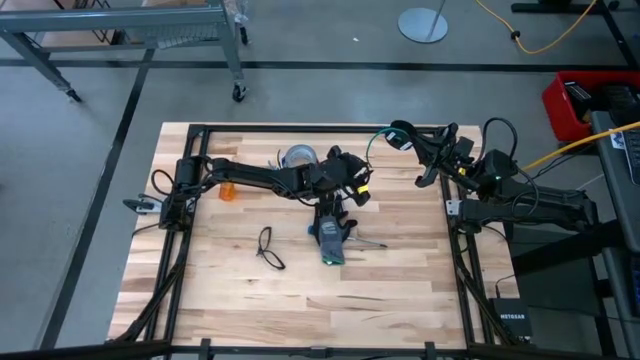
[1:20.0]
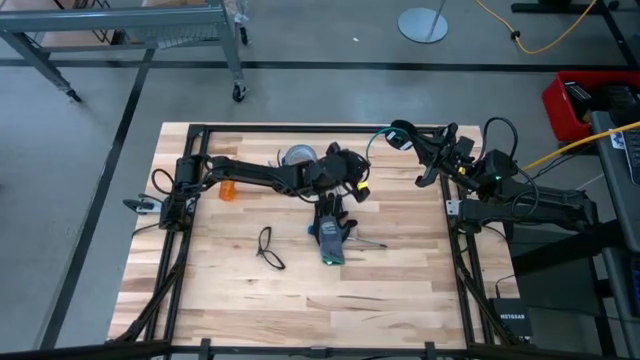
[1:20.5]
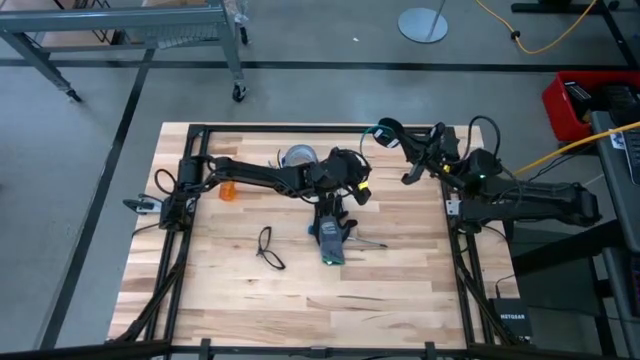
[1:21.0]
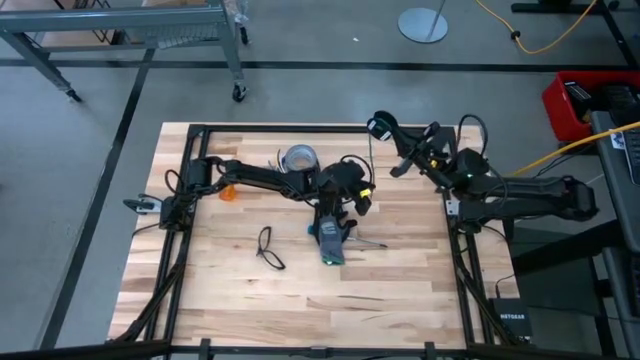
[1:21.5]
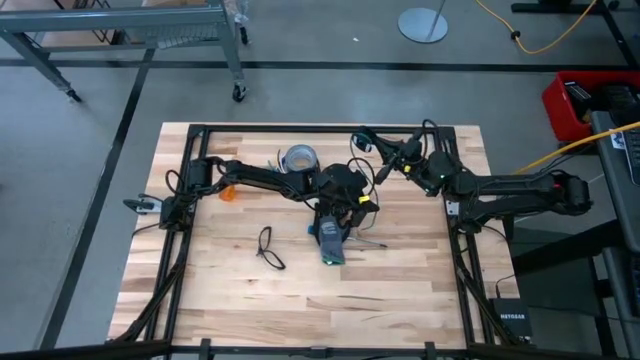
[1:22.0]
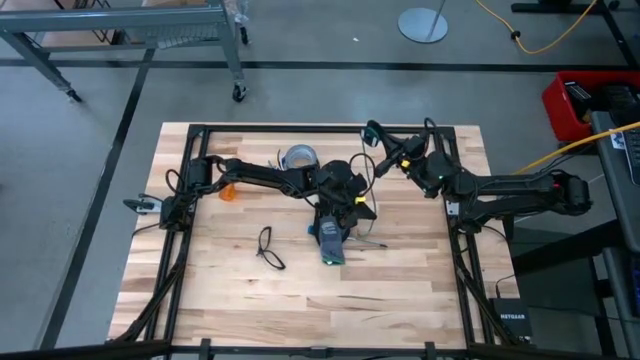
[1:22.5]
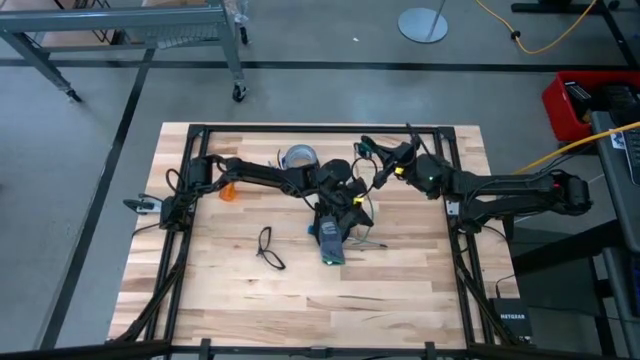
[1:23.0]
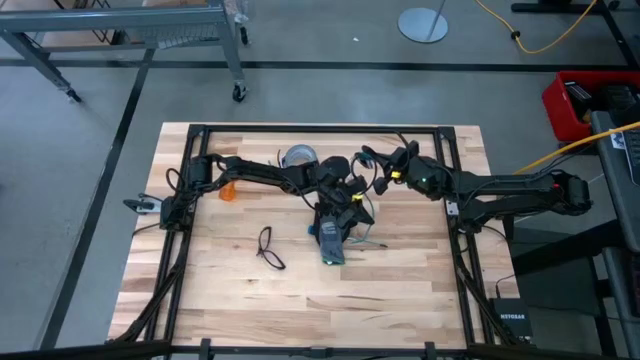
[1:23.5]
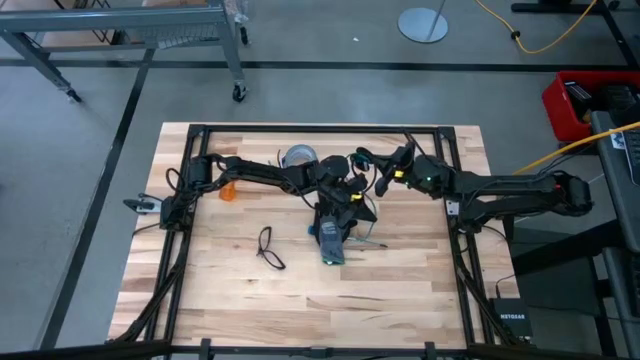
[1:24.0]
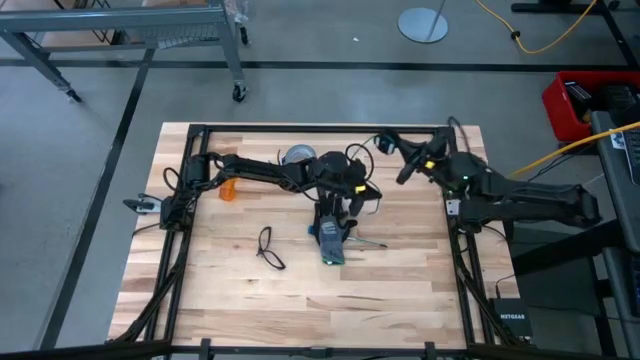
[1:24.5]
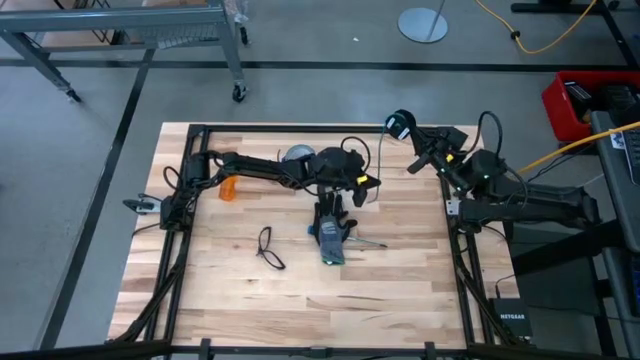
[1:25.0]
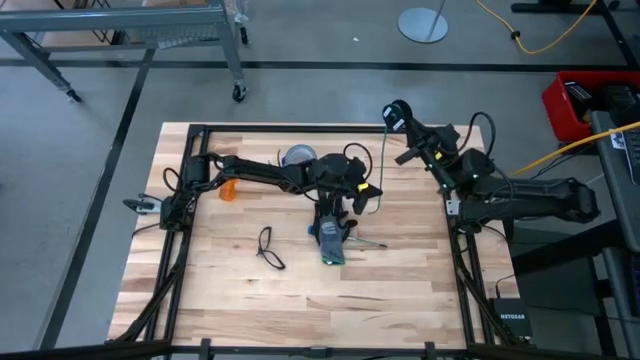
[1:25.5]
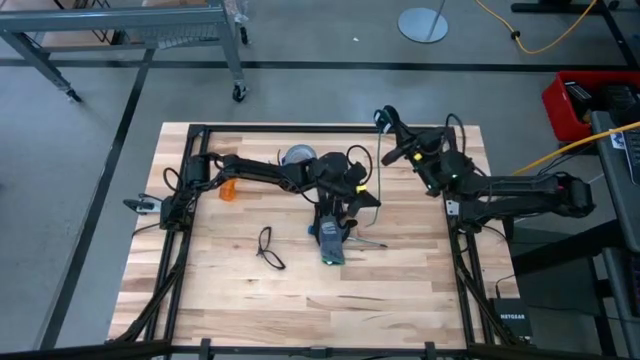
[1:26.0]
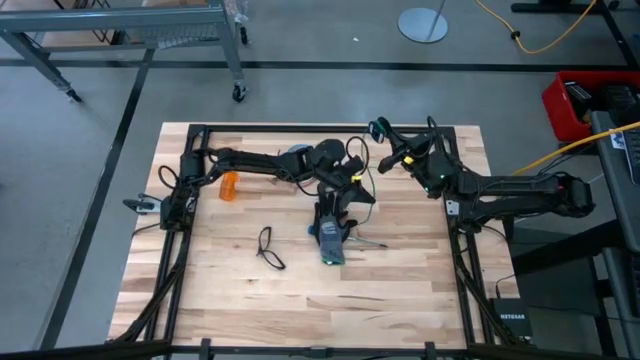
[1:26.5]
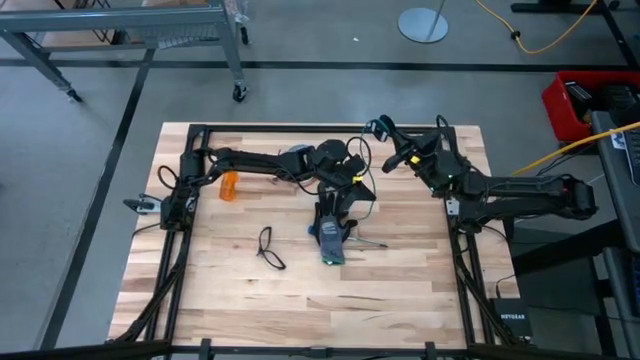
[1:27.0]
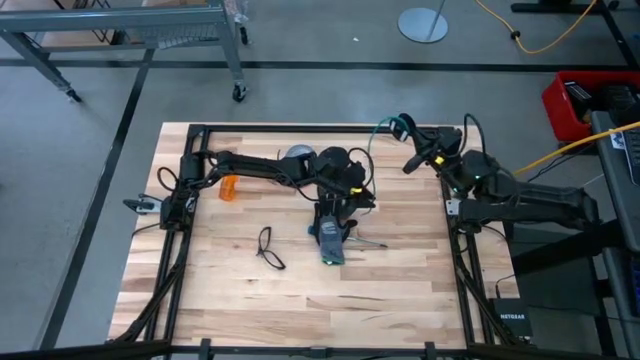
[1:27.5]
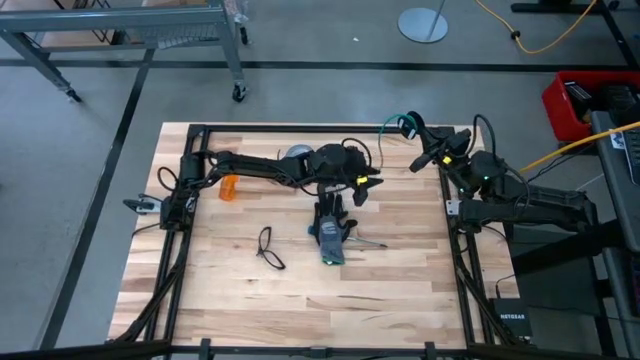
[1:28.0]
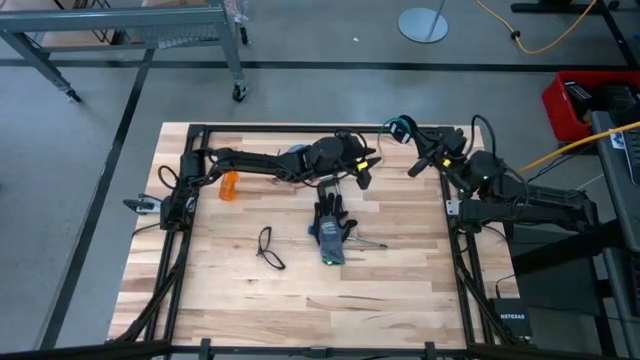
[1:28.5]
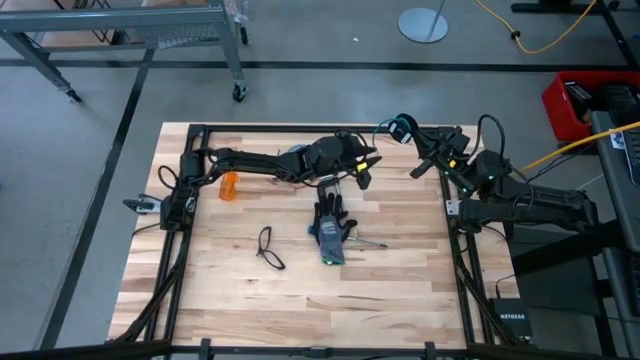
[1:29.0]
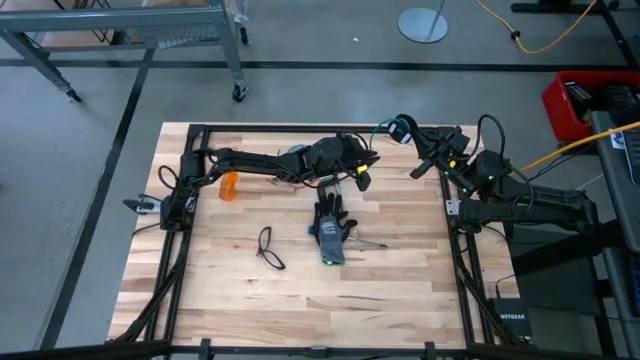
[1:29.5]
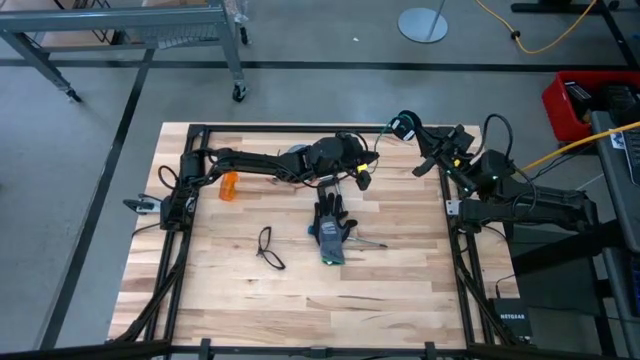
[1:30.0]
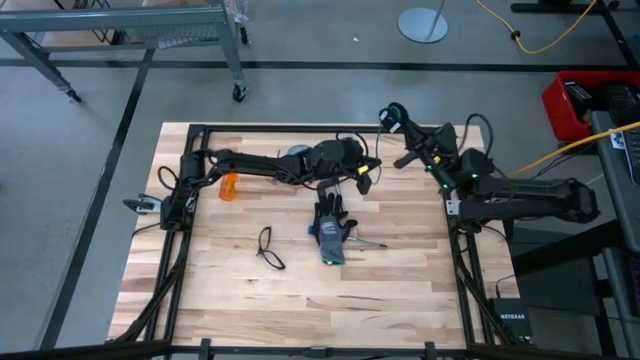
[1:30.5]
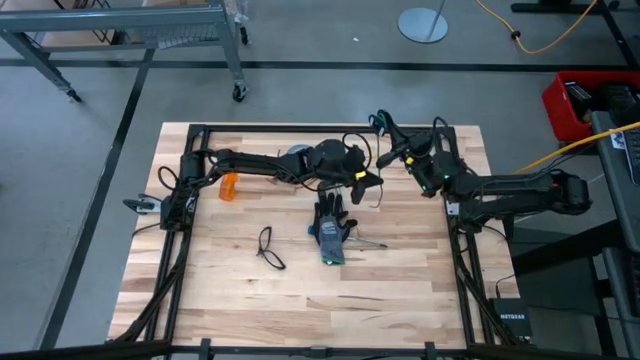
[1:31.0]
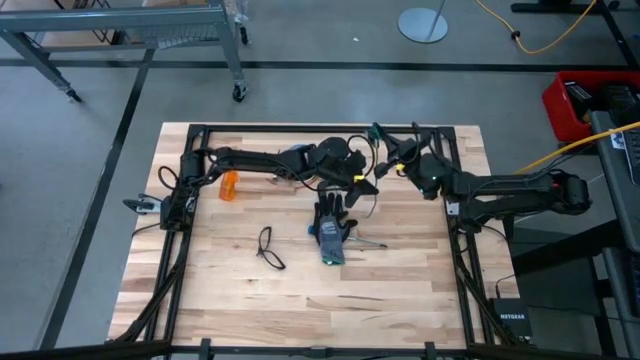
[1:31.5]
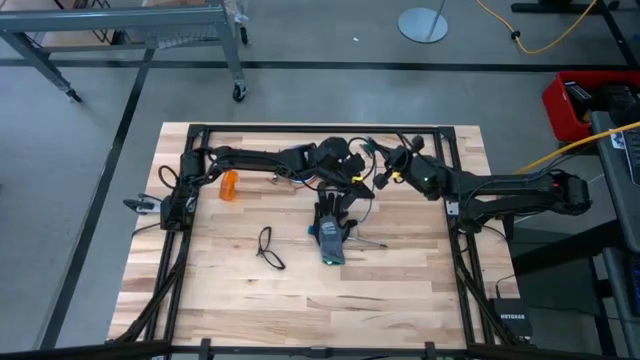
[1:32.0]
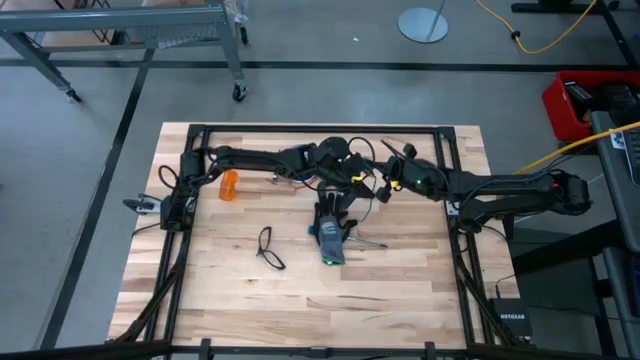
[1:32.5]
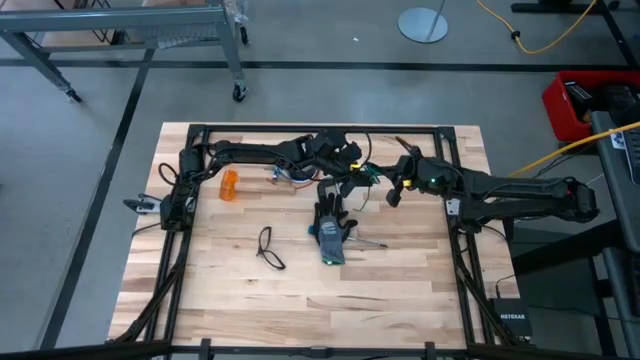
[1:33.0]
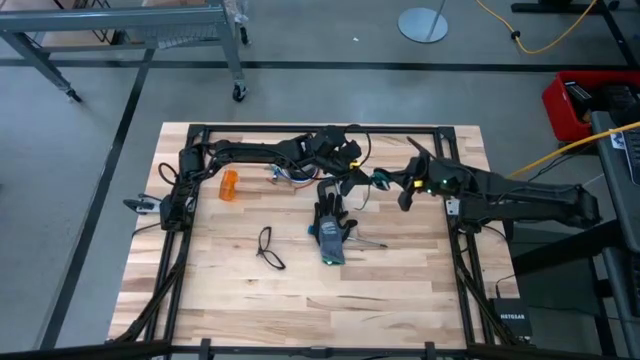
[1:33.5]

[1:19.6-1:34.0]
Task: Coil cords
Coil the green wire on the black spool

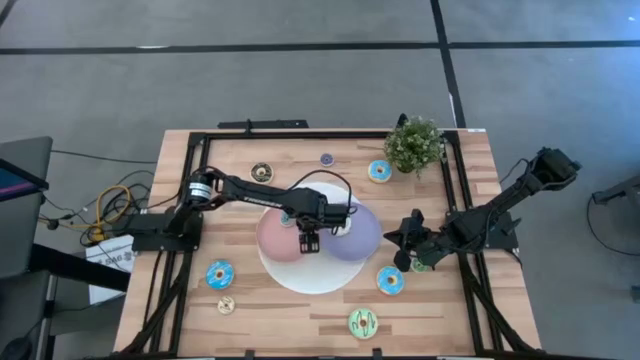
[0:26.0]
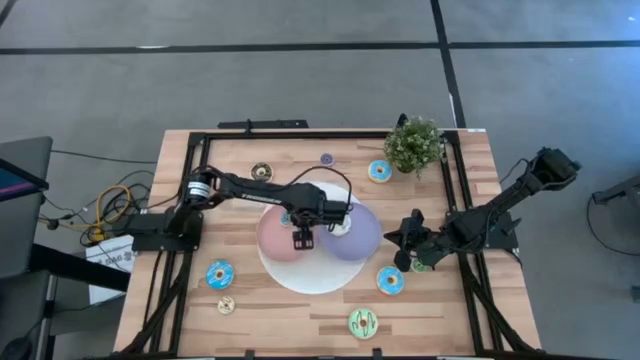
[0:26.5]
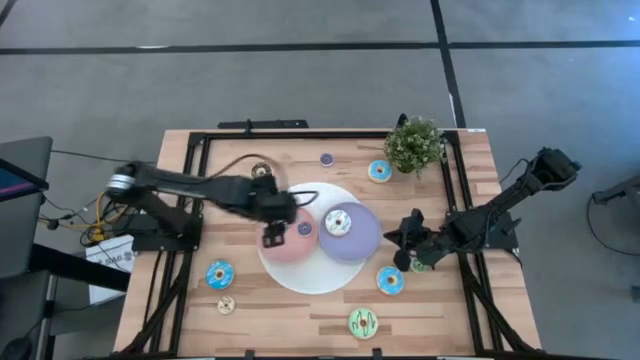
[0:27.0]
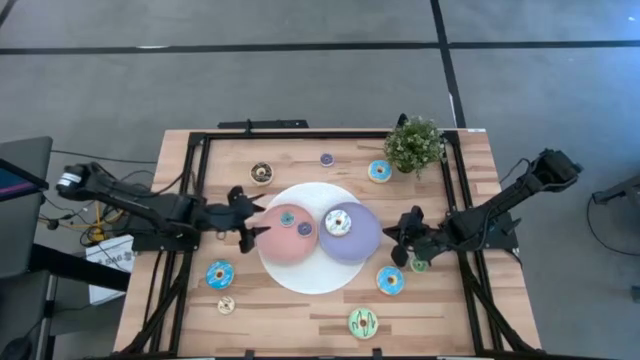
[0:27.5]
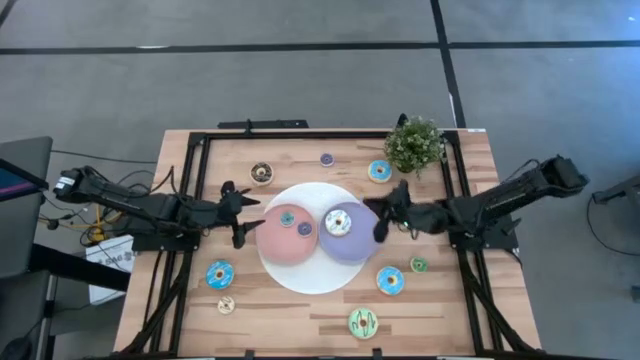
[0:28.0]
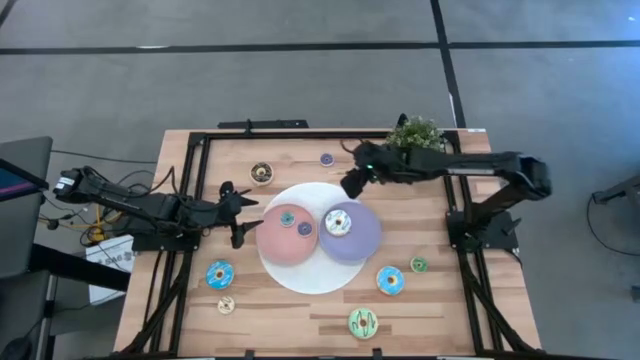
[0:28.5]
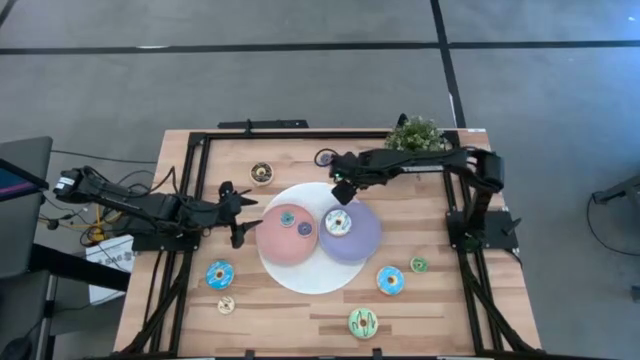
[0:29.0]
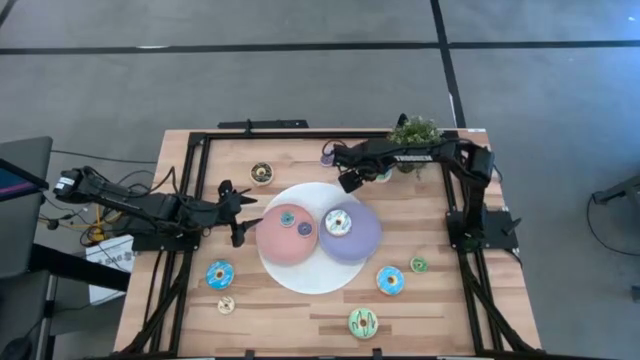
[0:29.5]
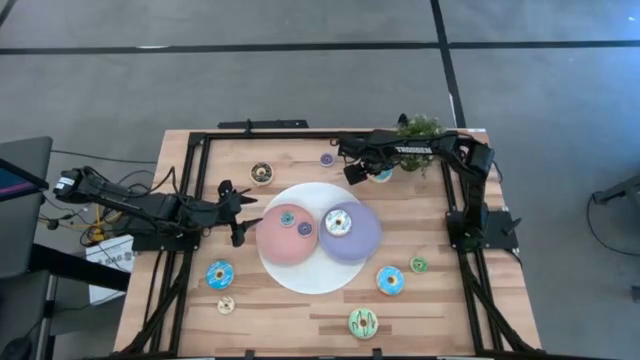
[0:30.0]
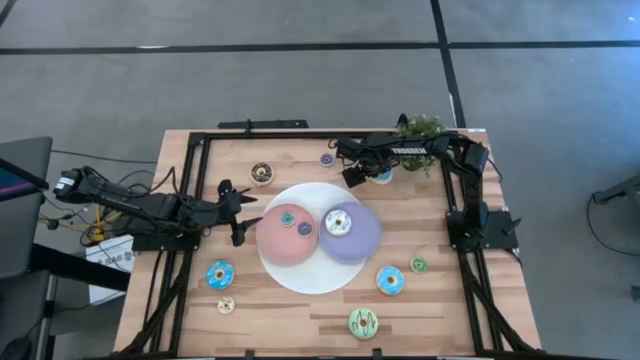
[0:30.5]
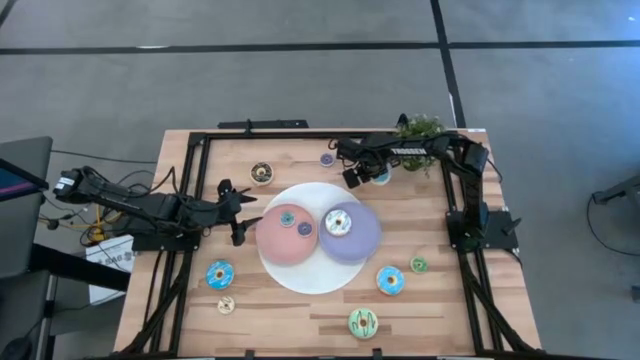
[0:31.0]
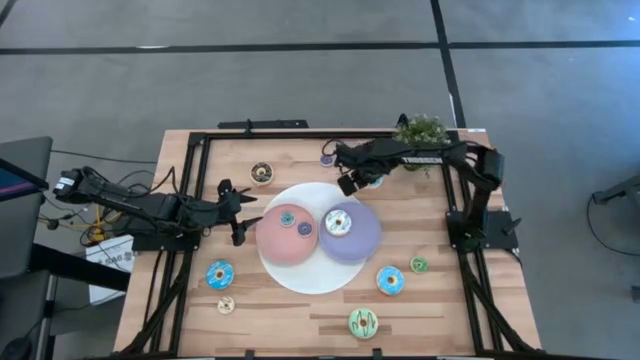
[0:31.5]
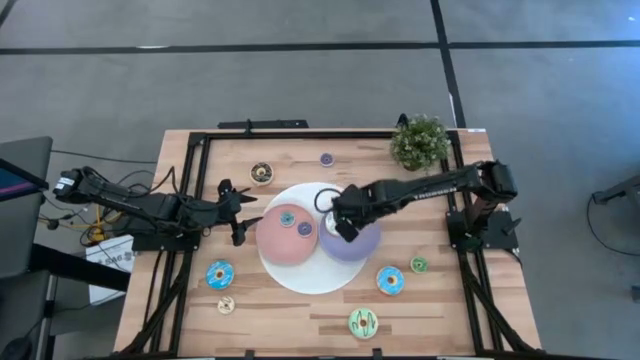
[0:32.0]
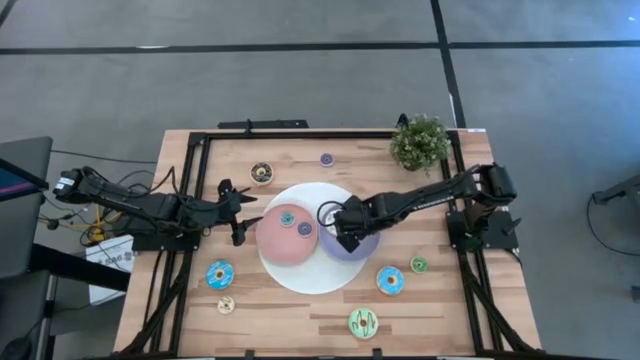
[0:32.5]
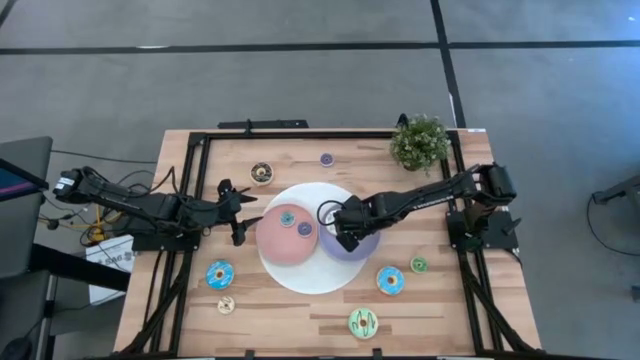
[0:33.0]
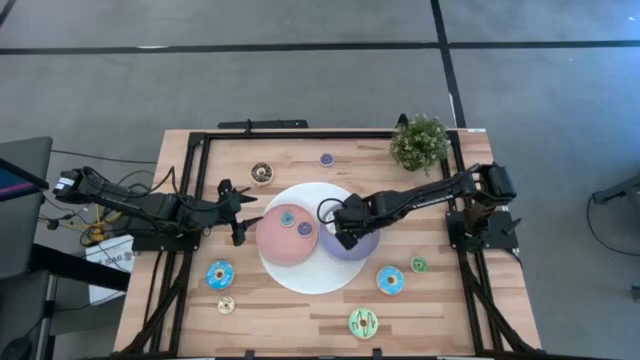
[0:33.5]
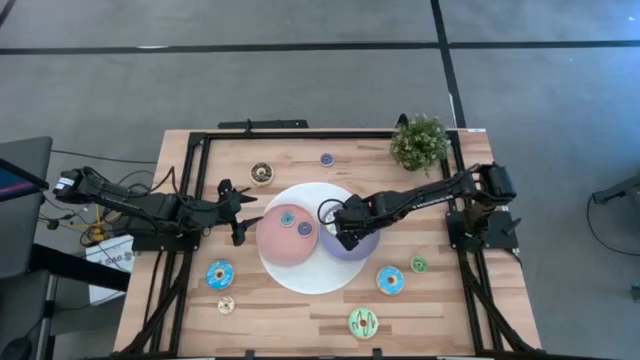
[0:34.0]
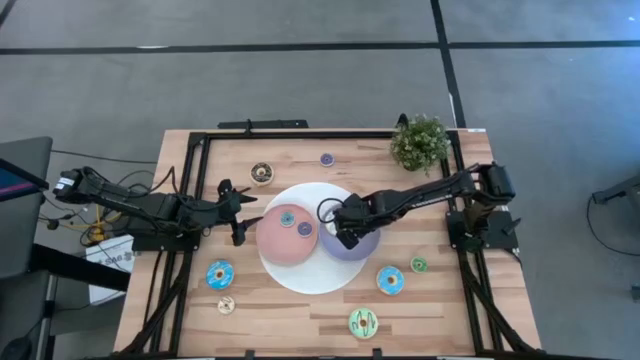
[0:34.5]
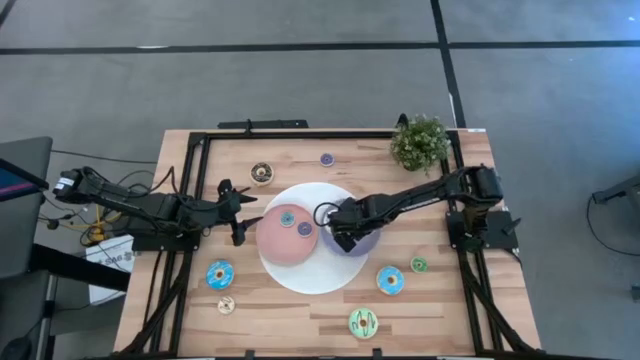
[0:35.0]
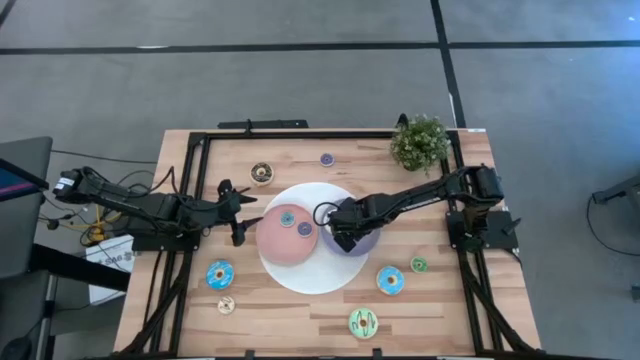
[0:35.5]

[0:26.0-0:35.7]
Task: Pick & Place donuts
Put the top big blue donut on the violet plate
